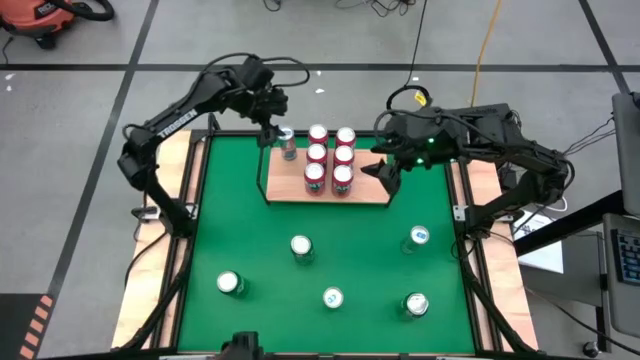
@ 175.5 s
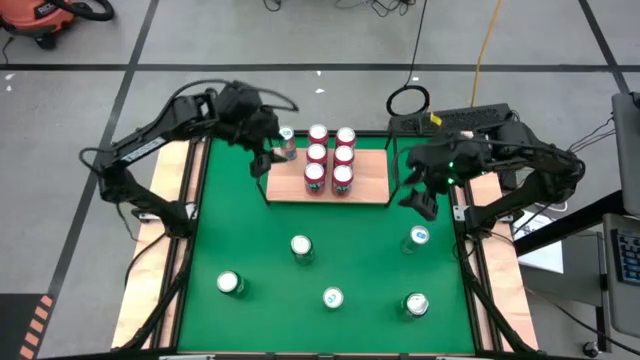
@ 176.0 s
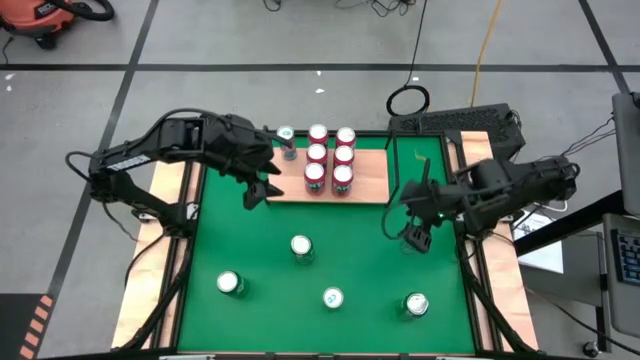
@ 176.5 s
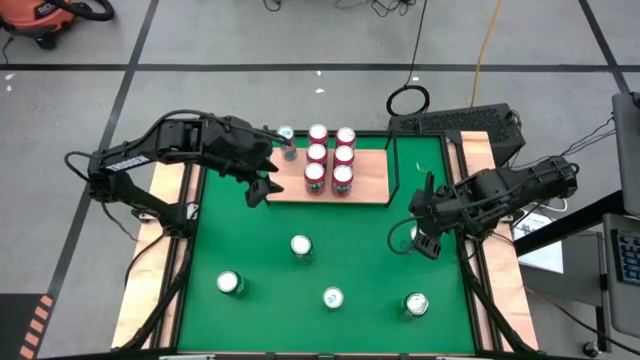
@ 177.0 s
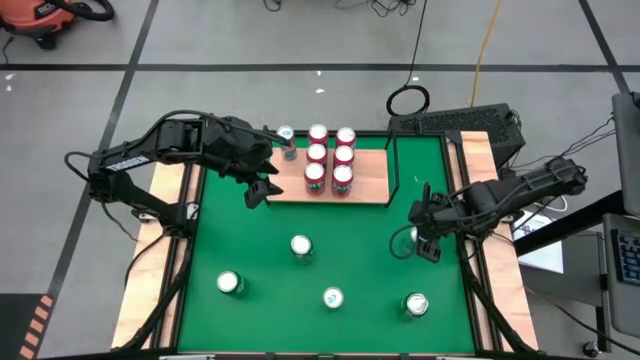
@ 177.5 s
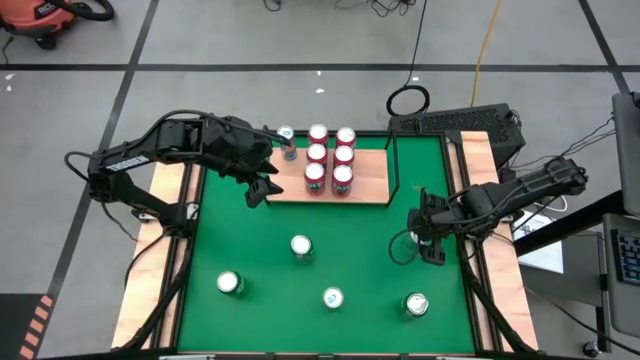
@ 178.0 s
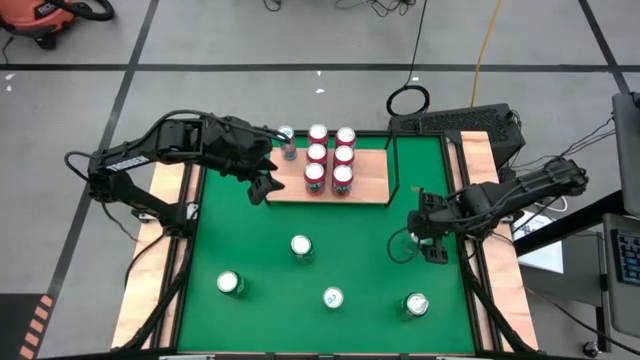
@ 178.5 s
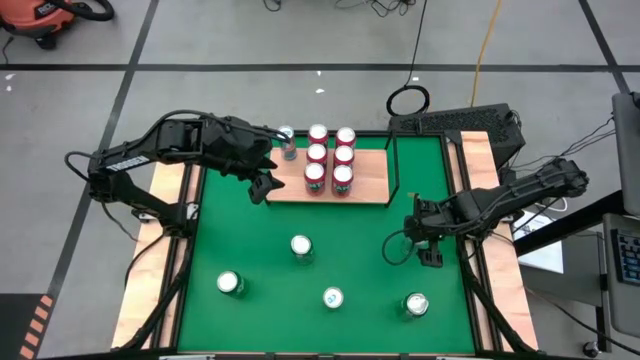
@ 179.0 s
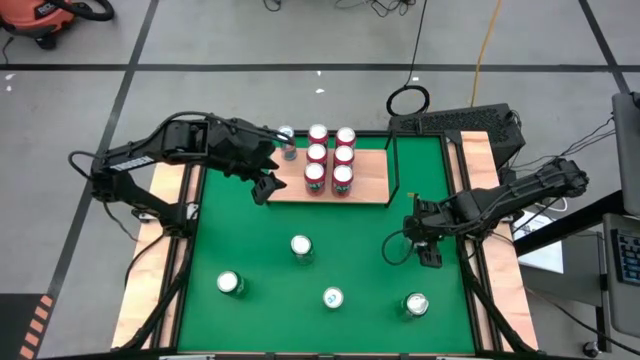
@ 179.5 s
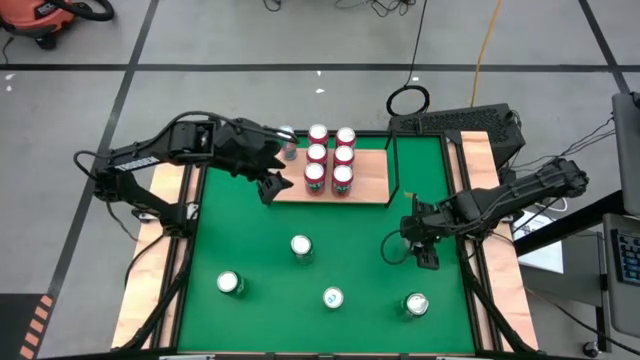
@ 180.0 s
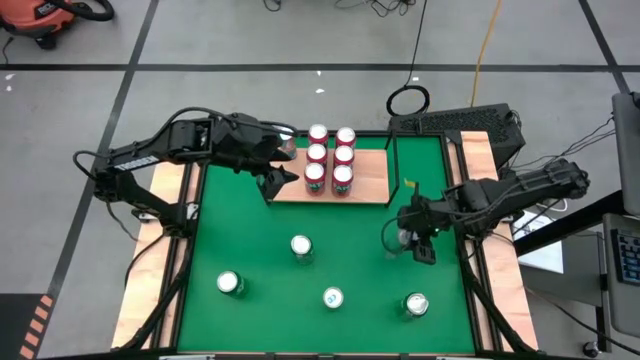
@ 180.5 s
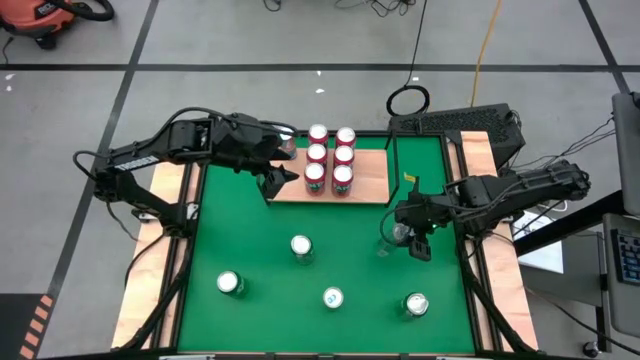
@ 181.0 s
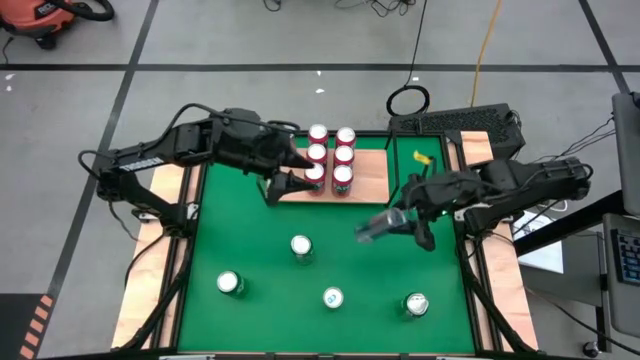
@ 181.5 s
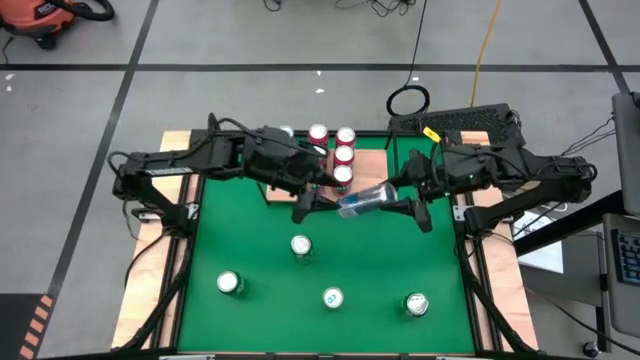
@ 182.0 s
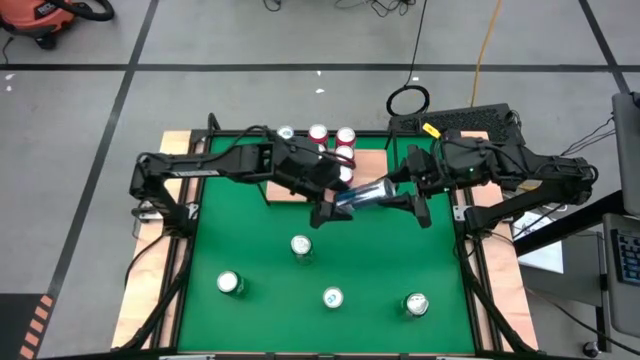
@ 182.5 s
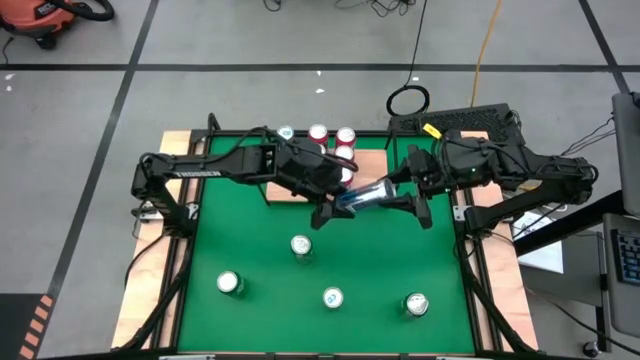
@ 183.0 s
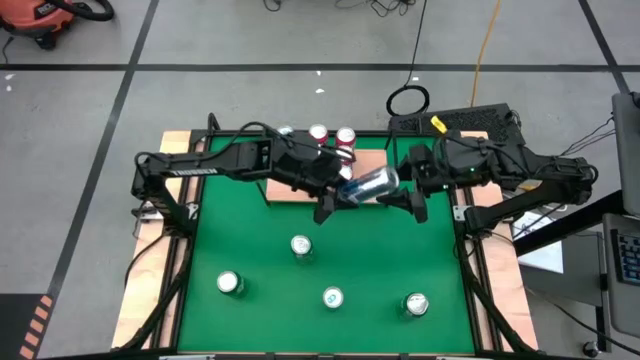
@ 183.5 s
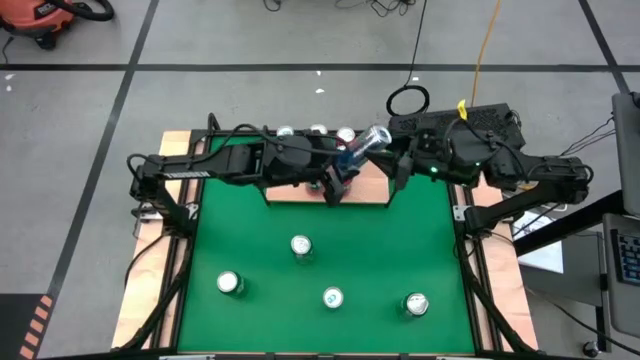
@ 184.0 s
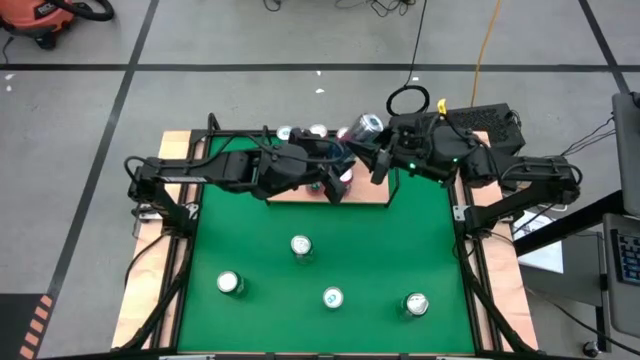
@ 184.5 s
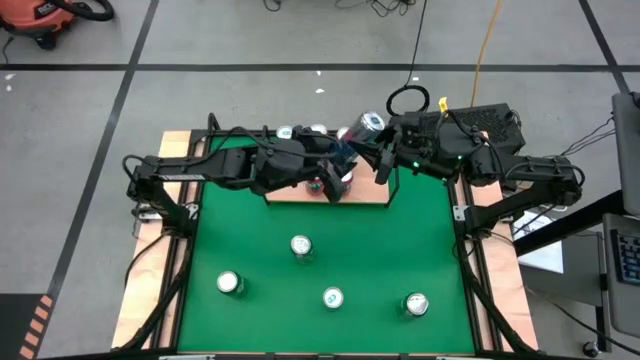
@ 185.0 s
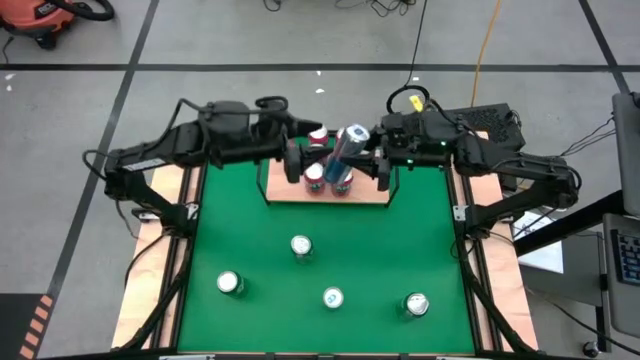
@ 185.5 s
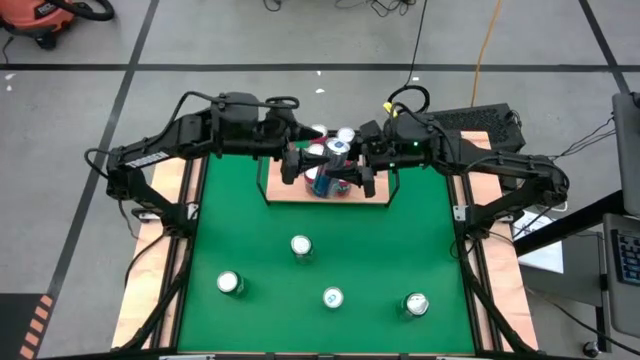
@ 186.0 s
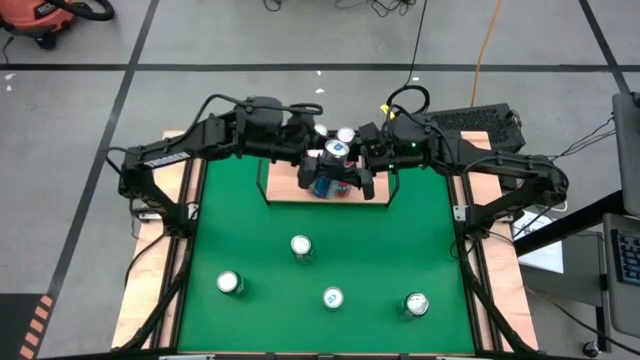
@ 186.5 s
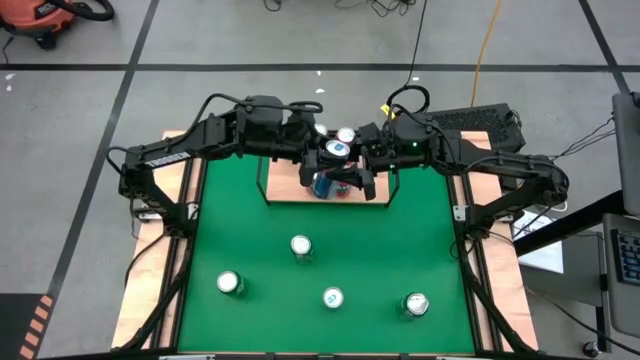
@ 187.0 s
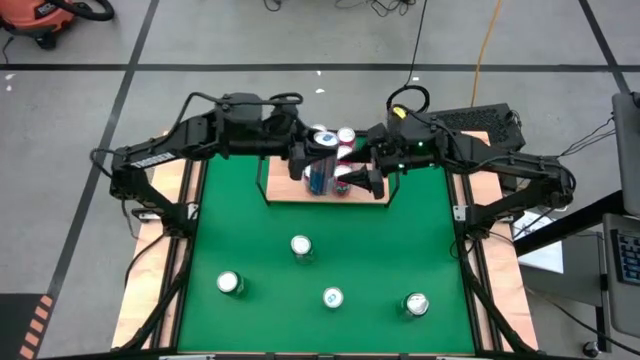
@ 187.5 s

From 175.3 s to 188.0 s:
Task: Place canned beverage on shelf
Put the blue soda can on the shelf aligned with the other blue soda can

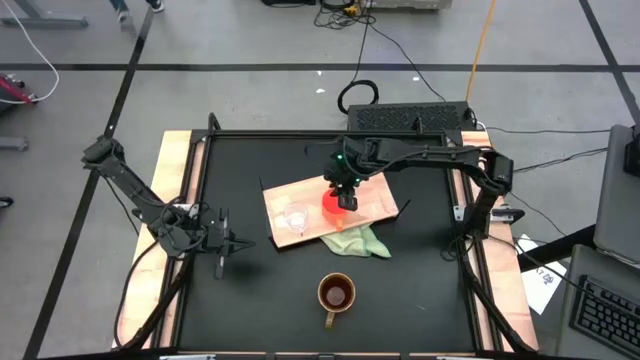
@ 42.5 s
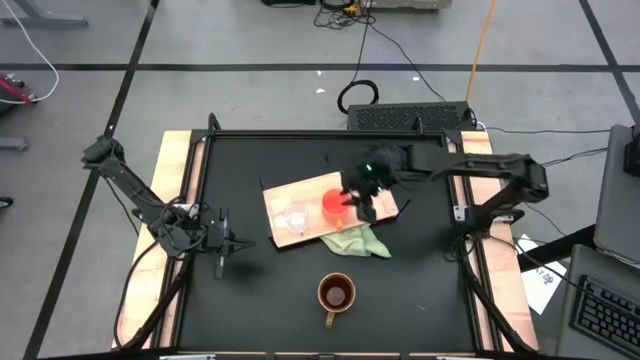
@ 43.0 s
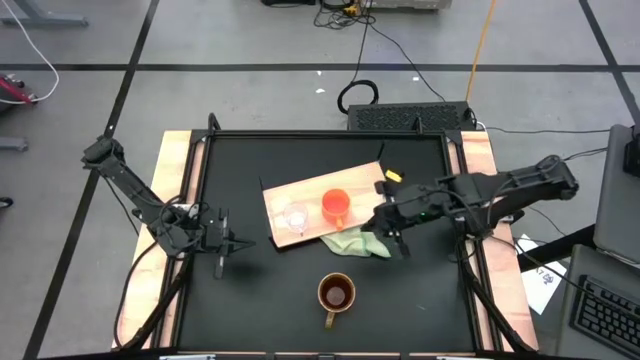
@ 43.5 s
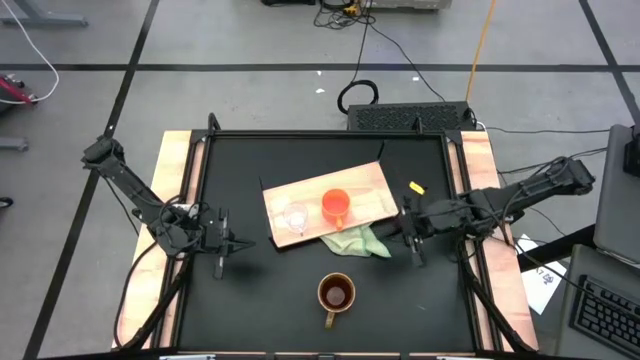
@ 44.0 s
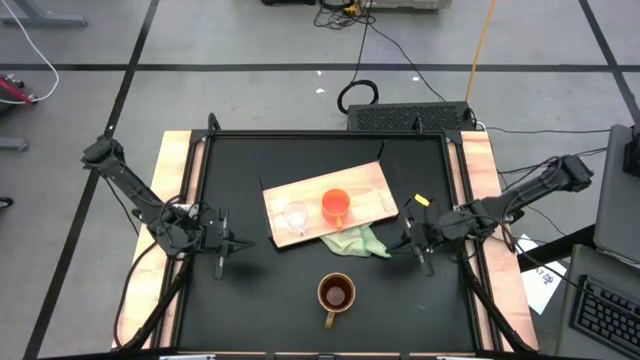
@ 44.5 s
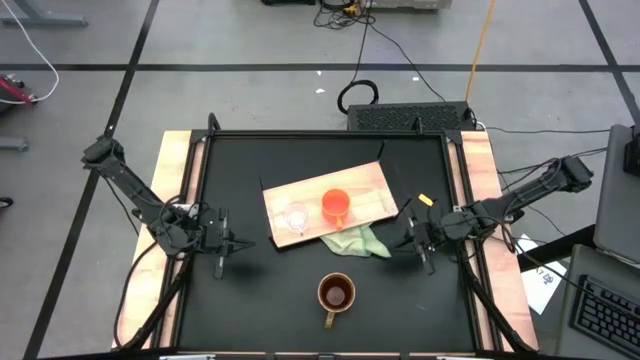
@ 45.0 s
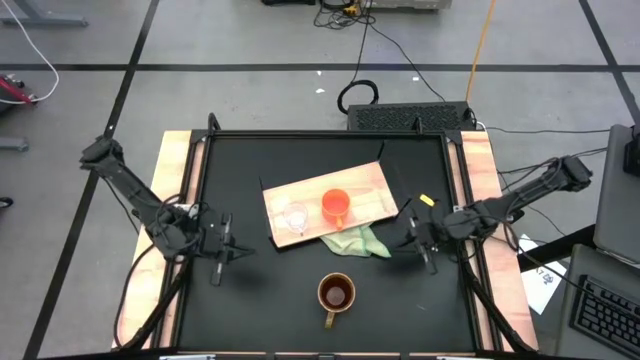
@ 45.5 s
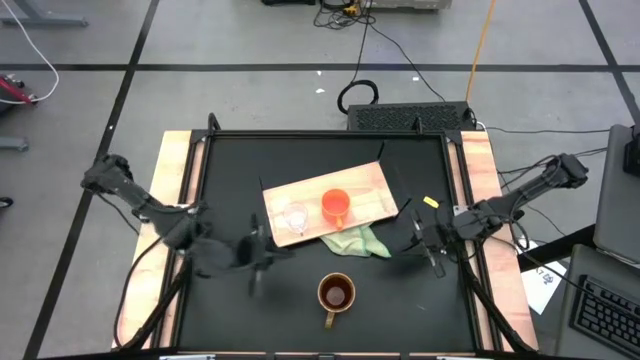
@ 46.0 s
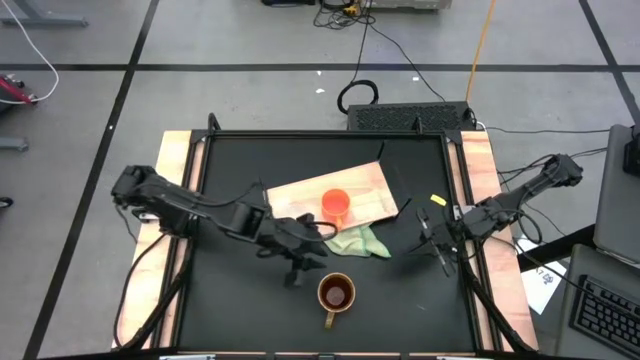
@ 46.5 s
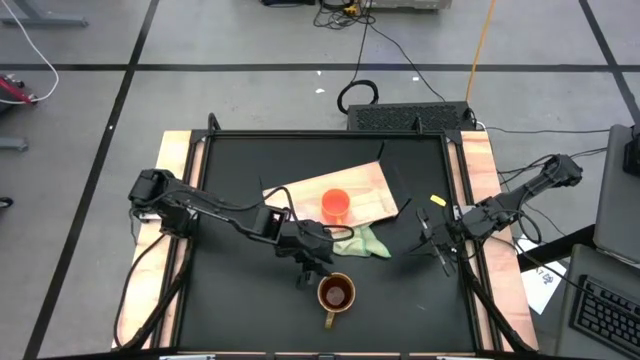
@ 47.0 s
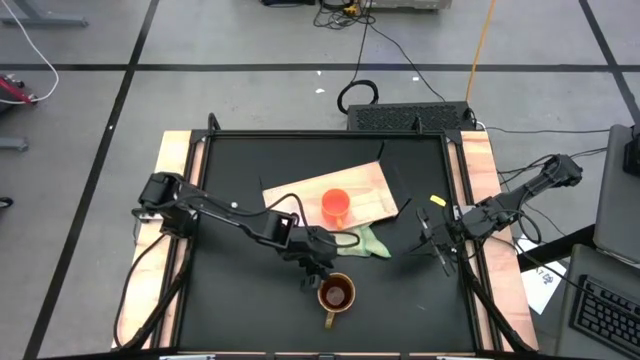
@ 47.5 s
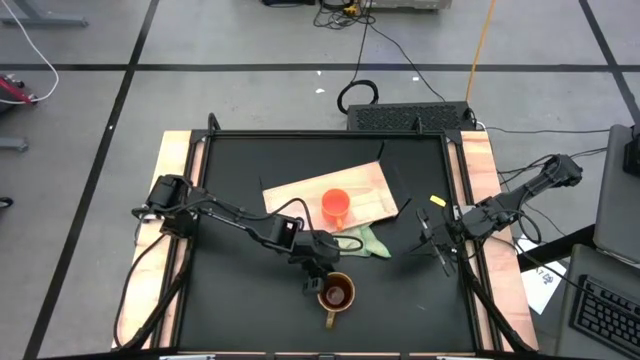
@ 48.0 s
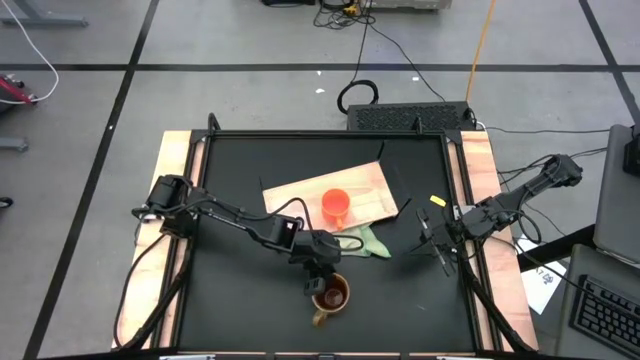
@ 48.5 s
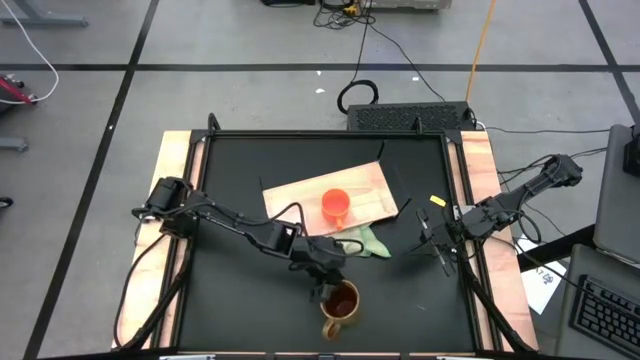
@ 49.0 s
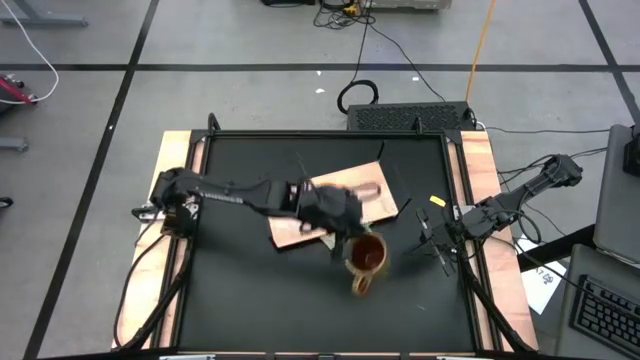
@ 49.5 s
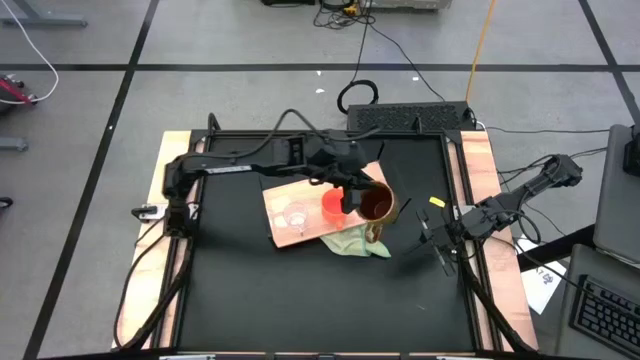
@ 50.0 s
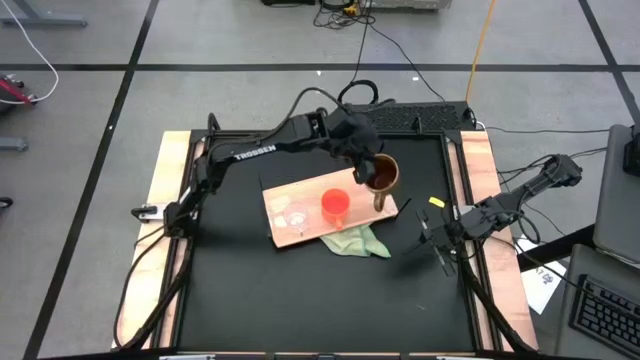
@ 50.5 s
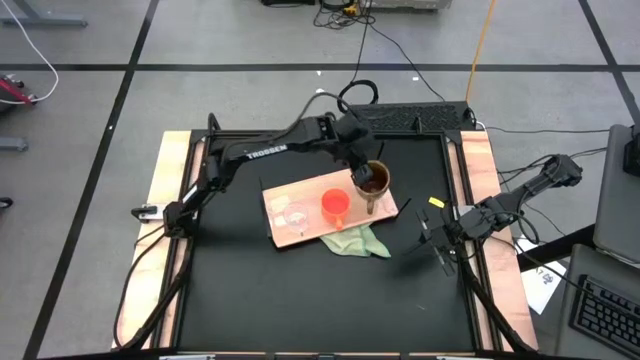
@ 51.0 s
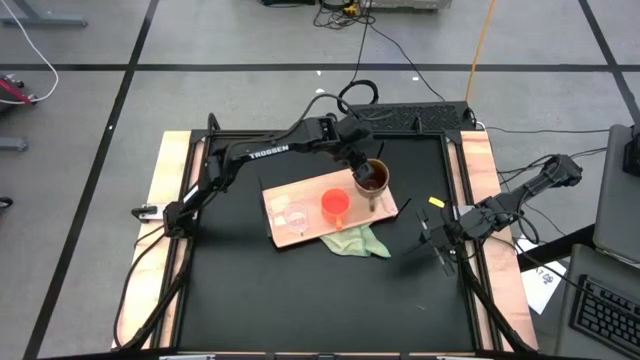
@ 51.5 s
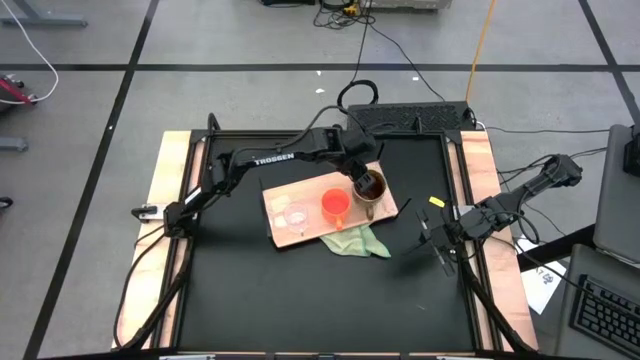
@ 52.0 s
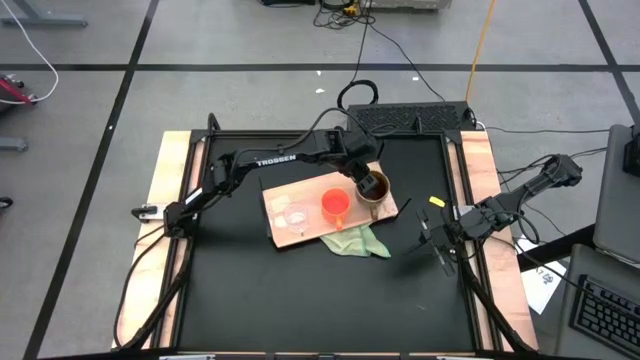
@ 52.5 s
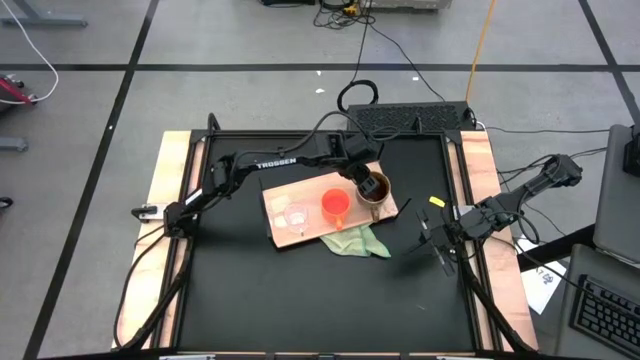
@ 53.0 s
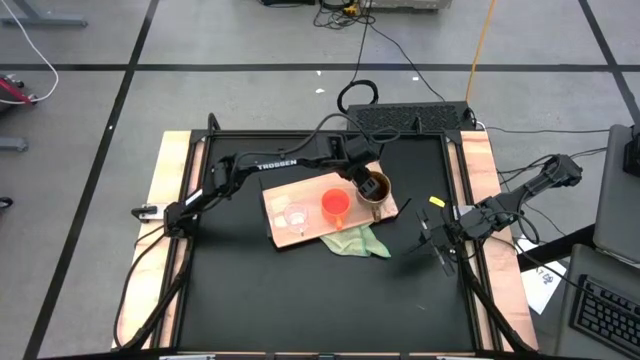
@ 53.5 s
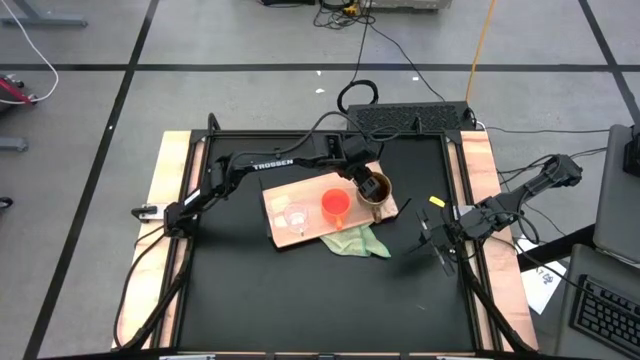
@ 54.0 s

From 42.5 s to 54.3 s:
Task: Stack small to large cups/mugs on shelf
Put the green and blue mug on the shelf
